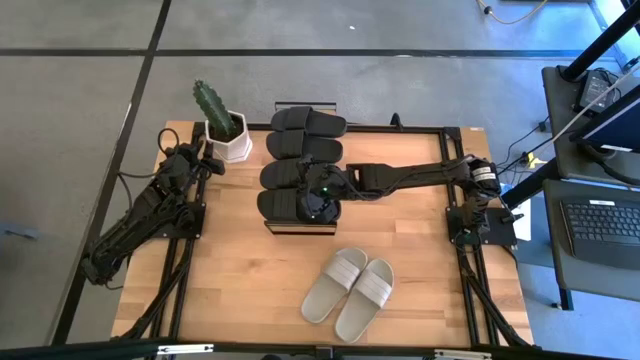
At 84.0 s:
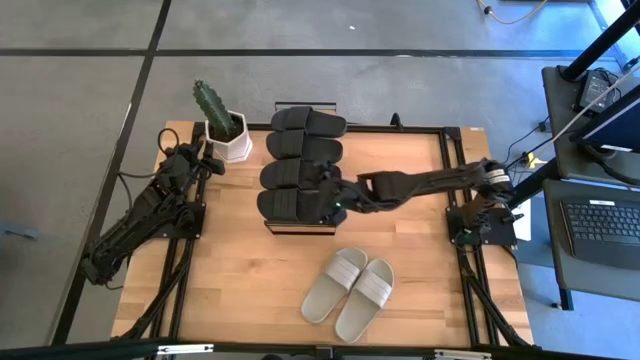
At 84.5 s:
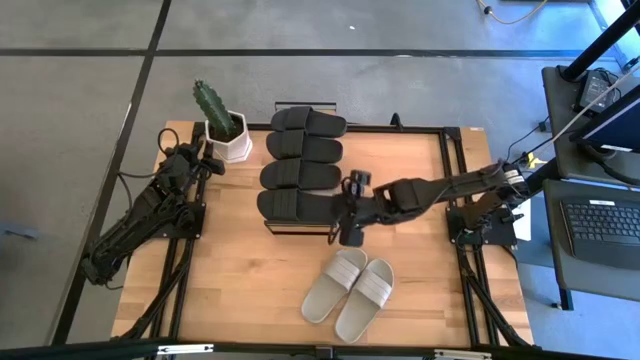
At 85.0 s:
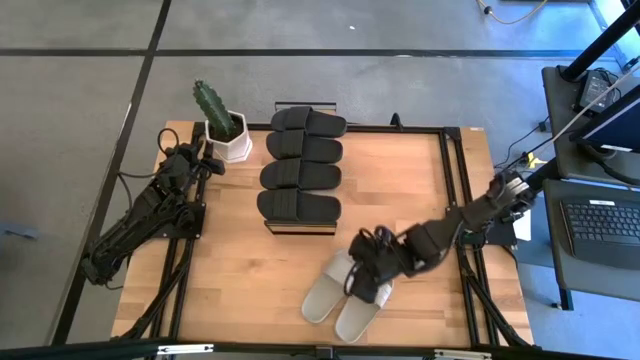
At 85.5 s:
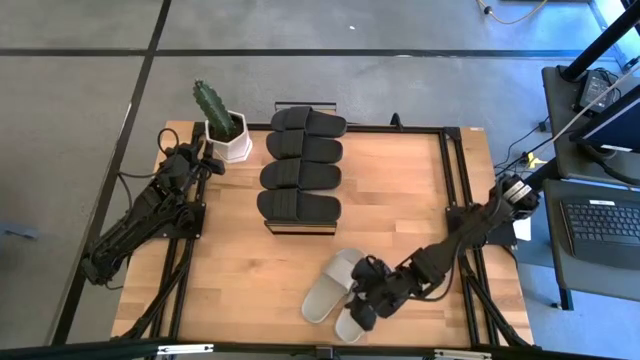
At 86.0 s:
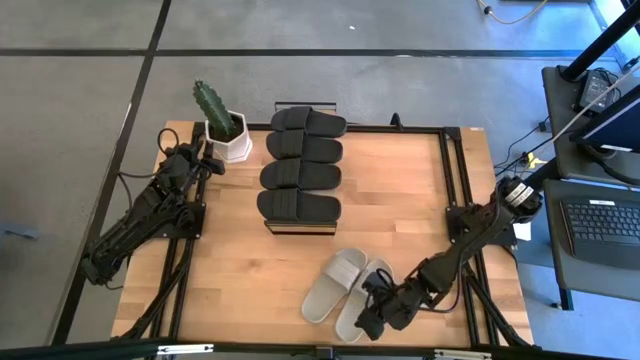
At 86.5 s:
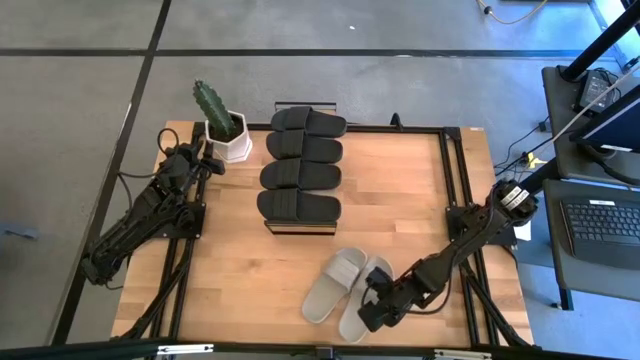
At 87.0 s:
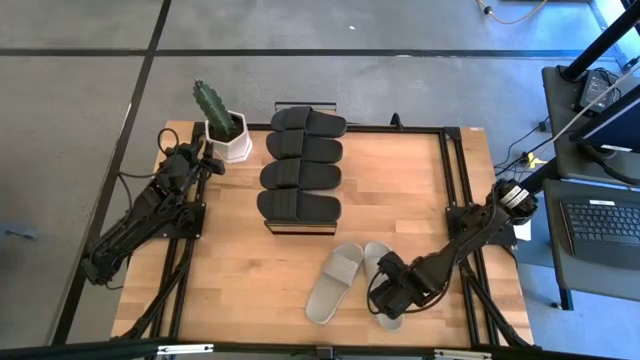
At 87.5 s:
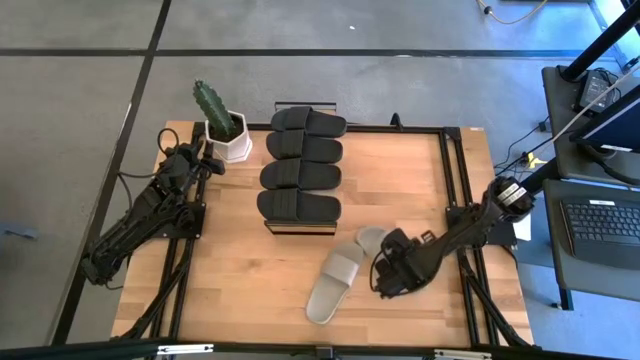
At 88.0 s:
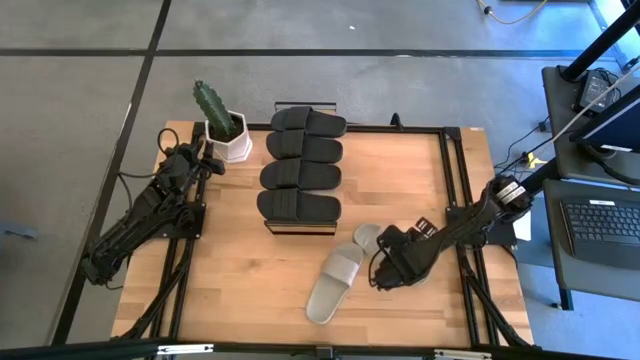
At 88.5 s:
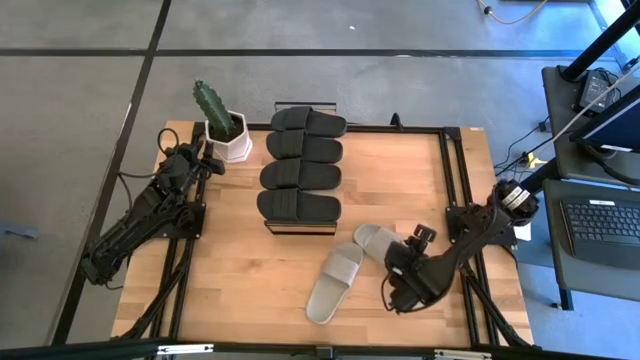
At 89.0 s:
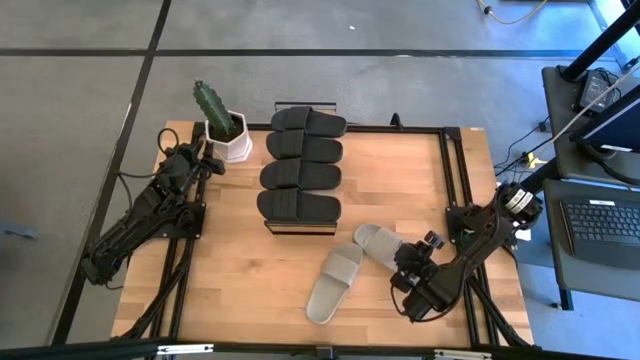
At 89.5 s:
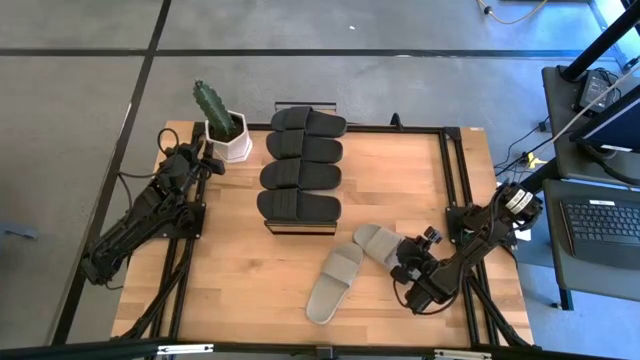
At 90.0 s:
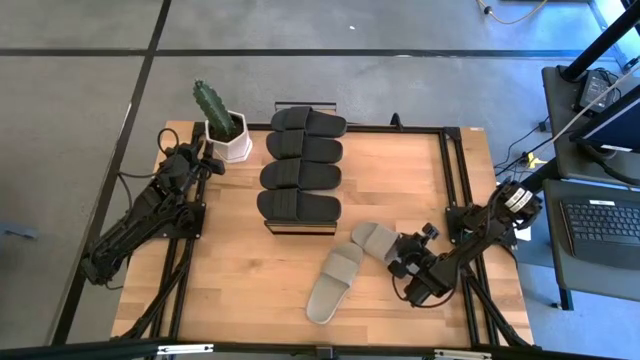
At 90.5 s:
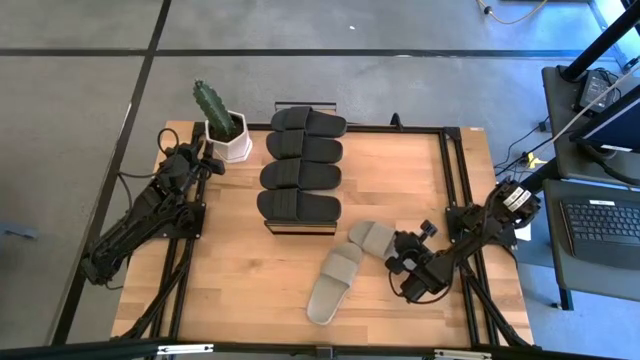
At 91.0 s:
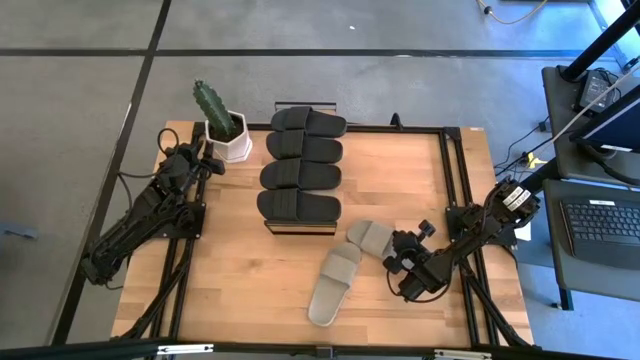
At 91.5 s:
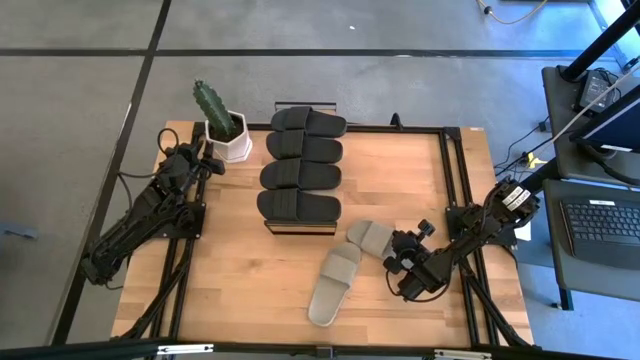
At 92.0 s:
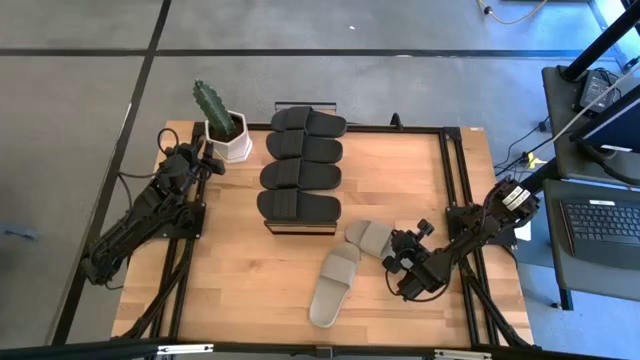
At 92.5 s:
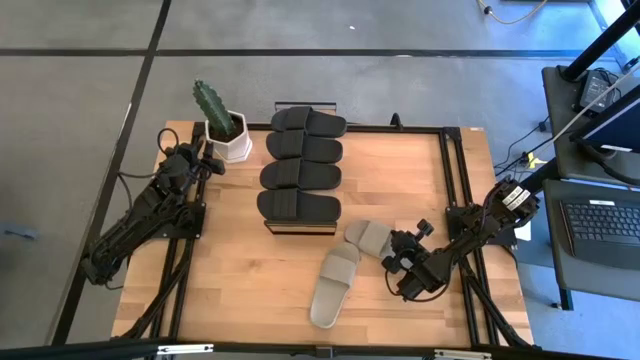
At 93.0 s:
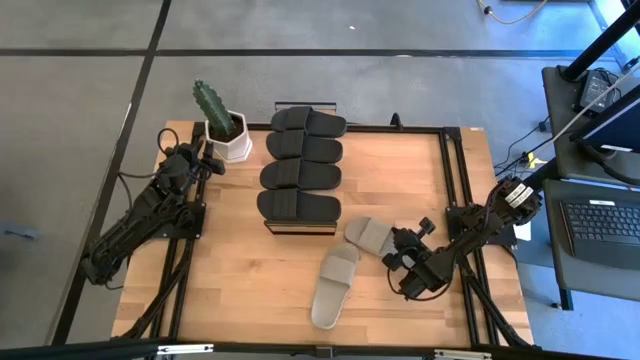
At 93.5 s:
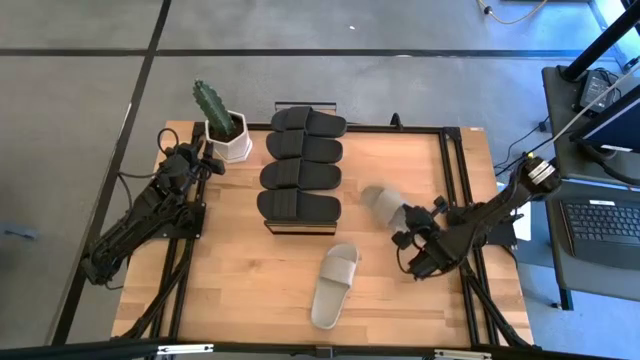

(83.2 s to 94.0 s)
Task: Pick and place slides into the shelf
Put the right gray slide under the shelf

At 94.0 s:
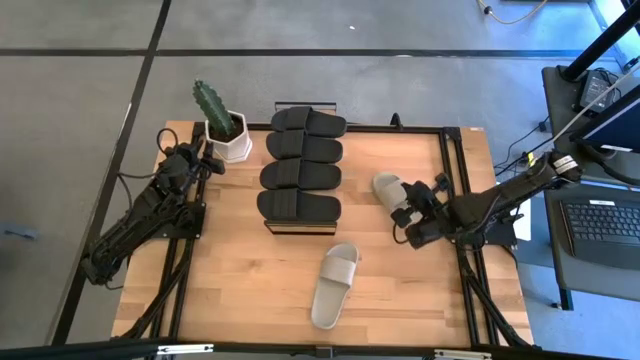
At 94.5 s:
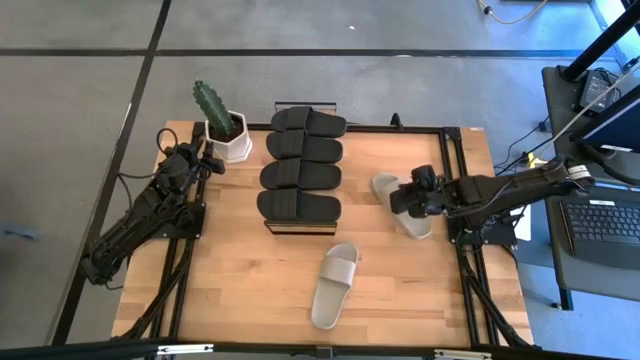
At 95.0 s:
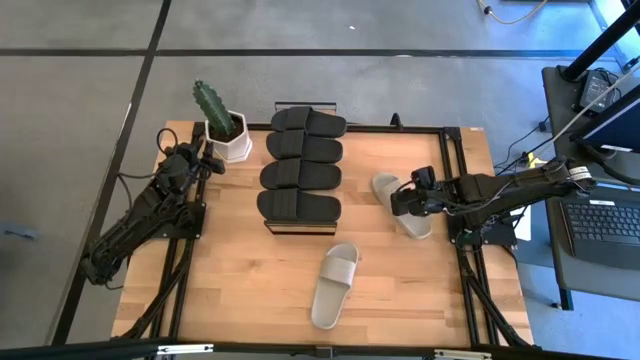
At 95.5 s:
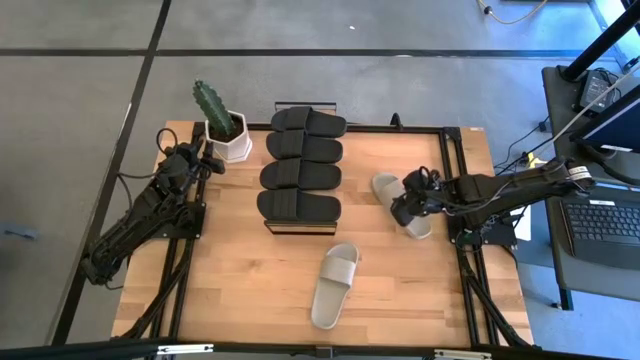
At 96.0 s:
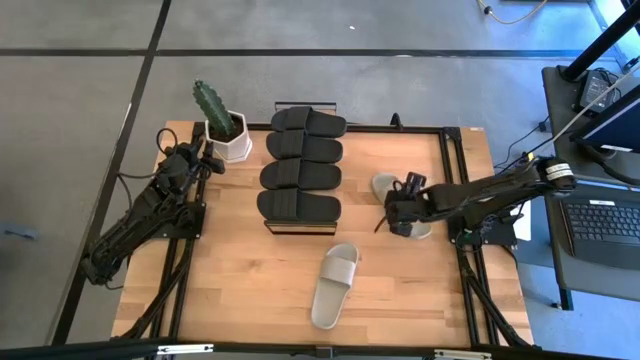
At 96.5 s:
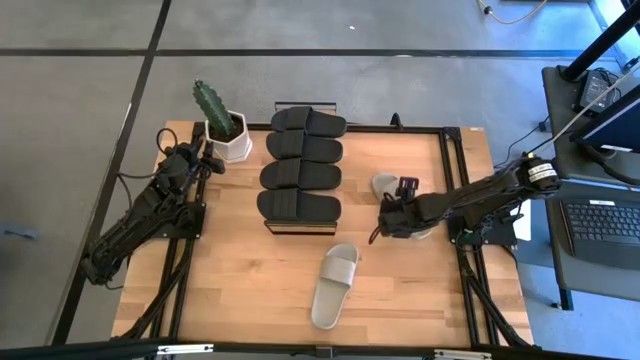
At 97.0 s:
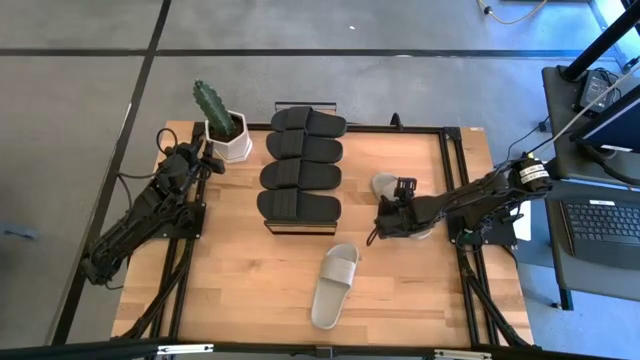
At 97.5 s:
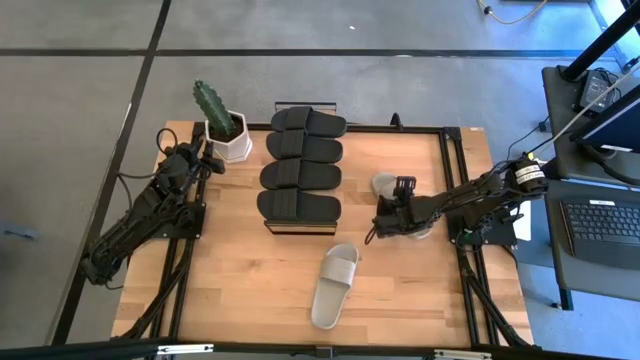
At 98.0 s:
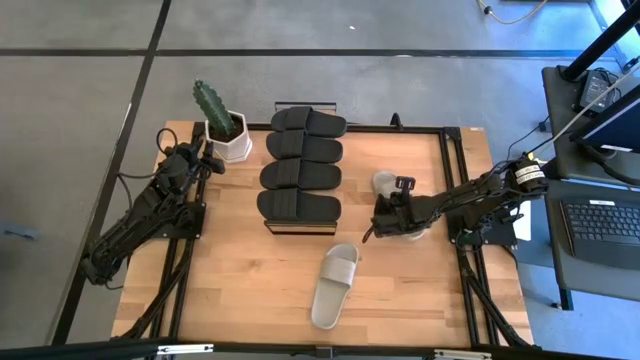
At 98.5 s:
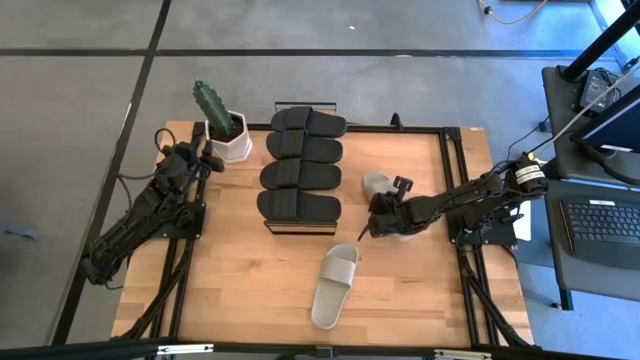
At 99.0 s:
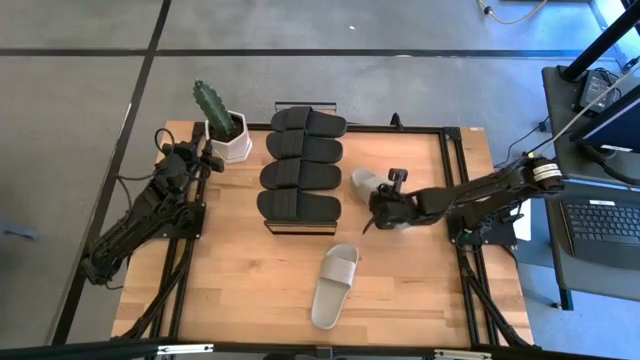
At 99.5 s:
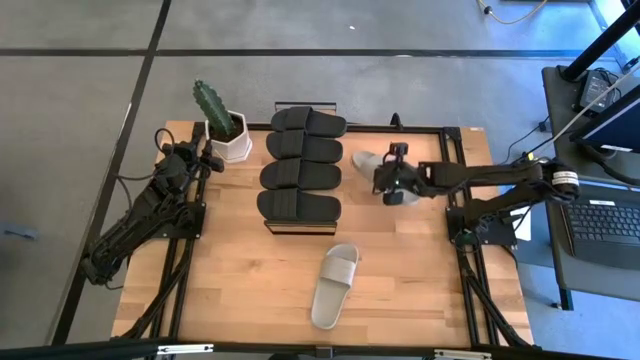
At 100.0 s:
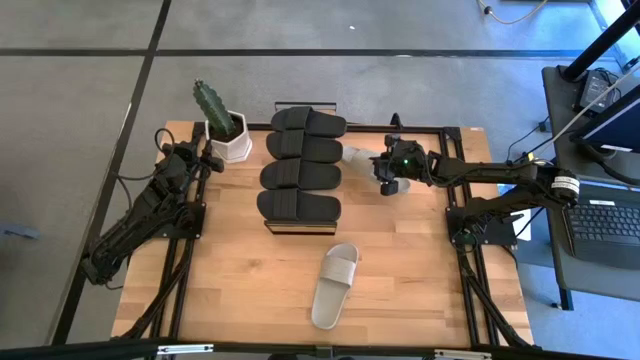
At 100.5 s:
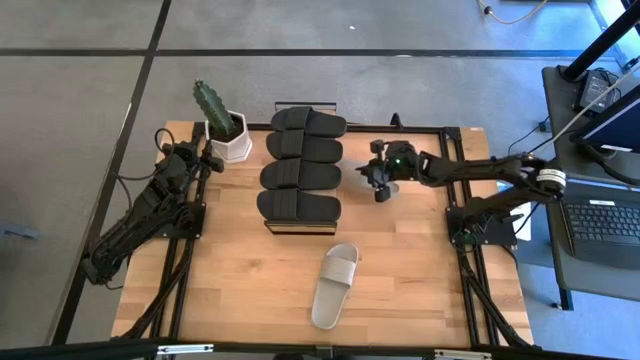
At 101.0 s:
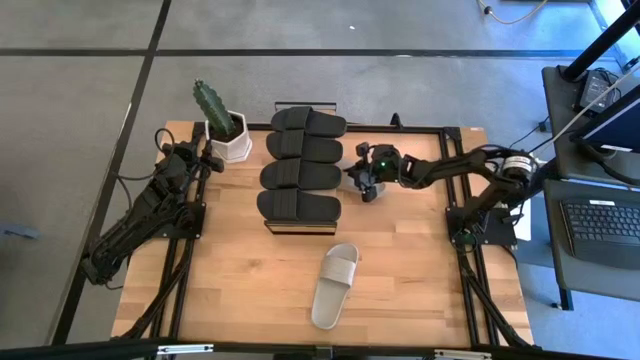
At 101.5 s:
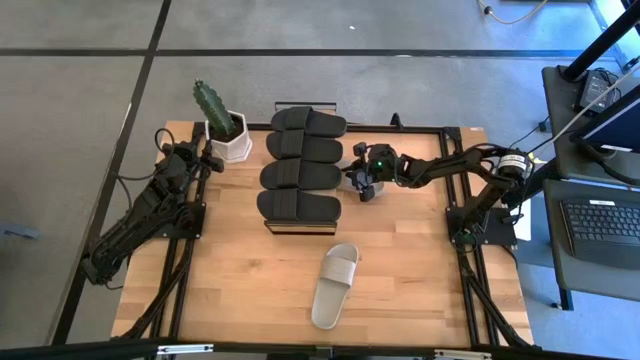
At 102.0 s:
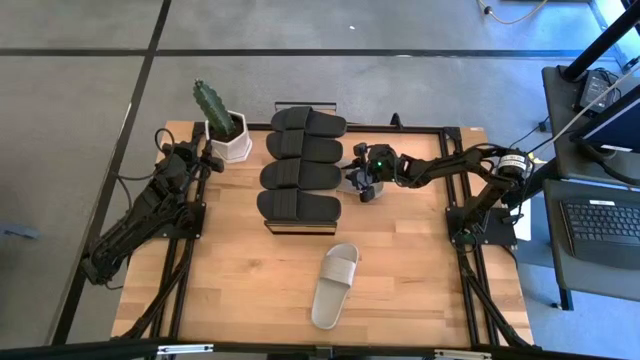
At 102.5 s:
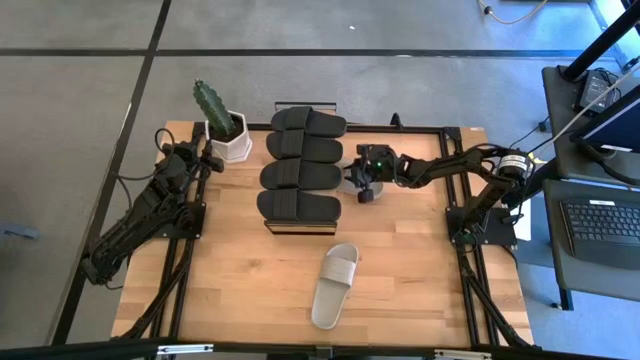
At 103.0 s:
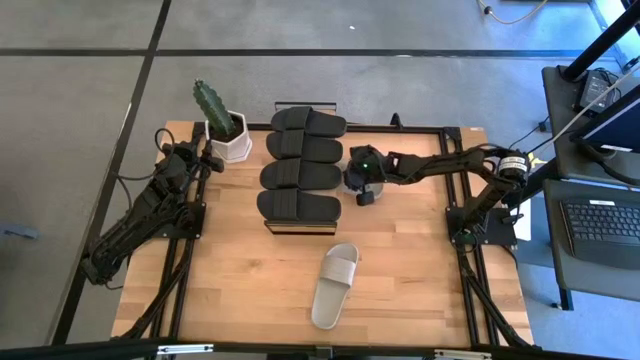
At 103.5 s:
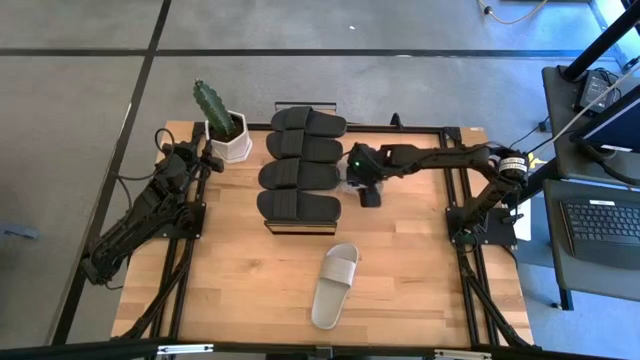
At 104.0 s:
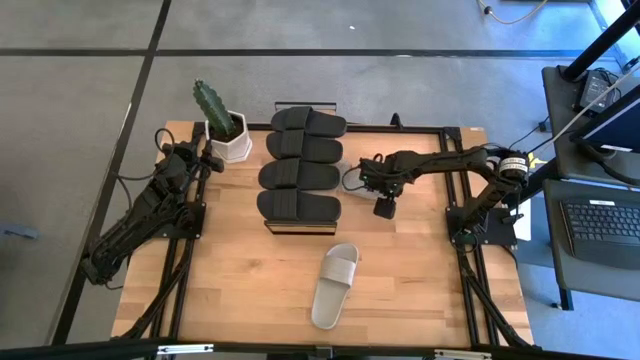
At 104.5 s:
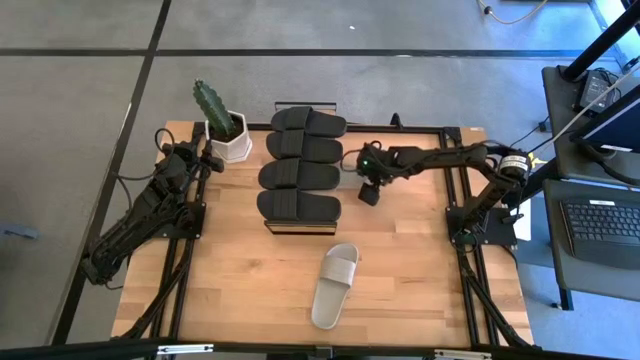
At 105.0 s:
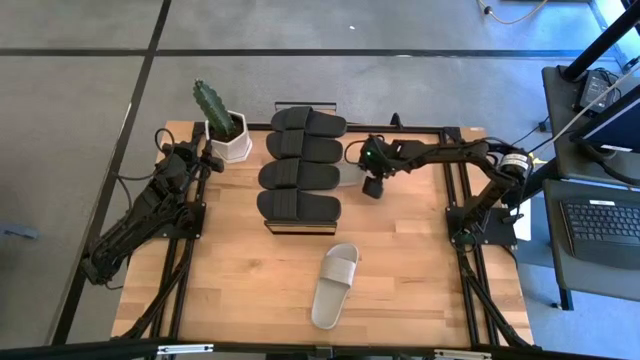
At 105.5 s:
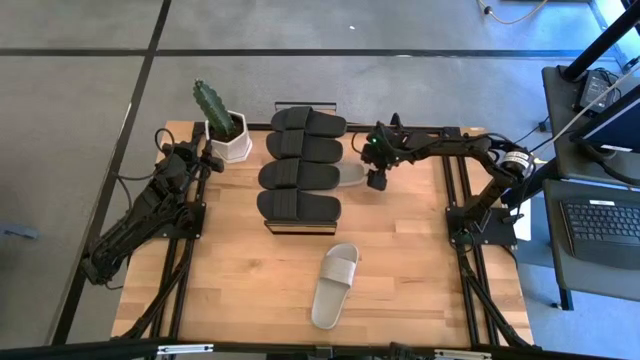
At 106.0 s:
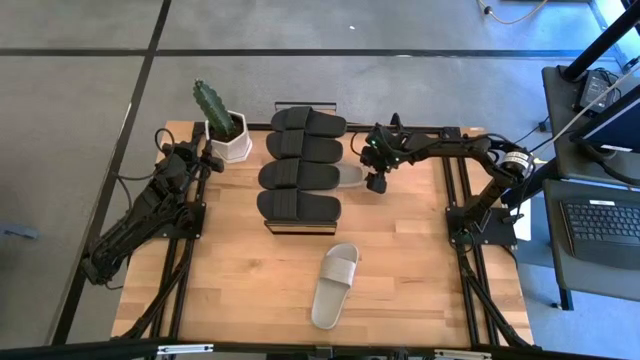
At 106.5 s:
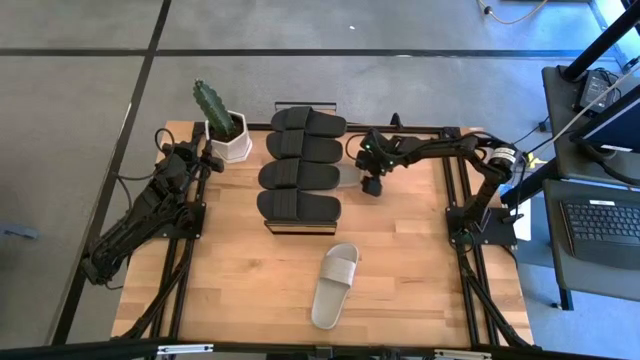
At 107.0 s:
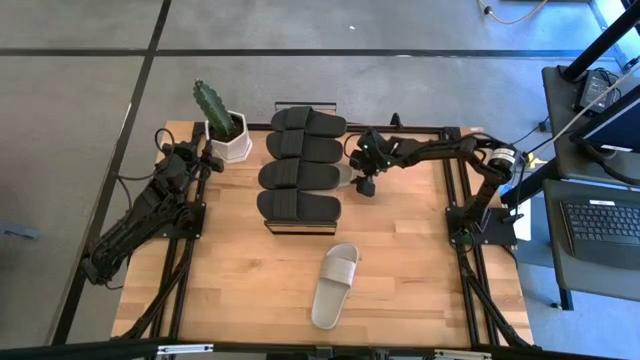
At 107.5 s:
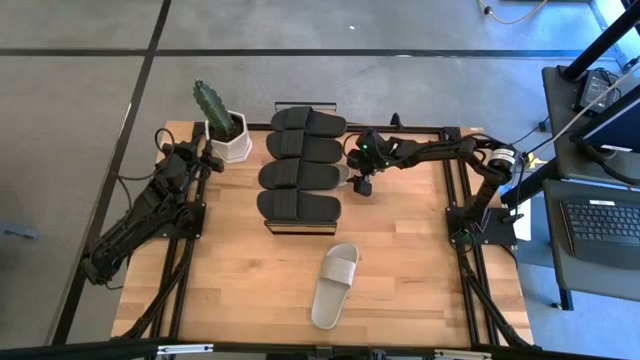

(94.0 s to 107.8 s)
Put the right white slide under the shelf
